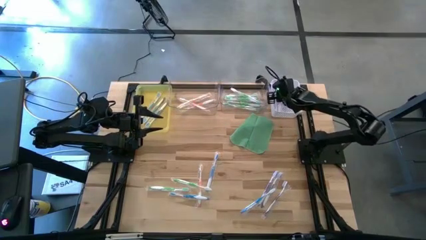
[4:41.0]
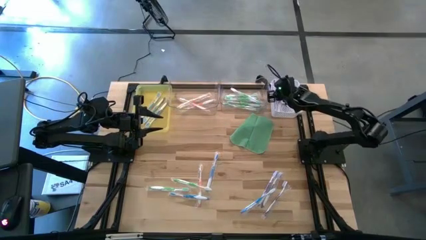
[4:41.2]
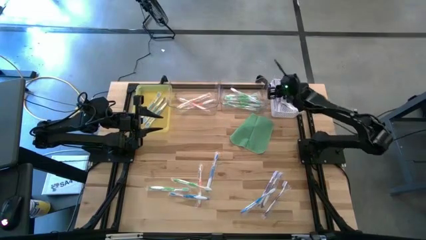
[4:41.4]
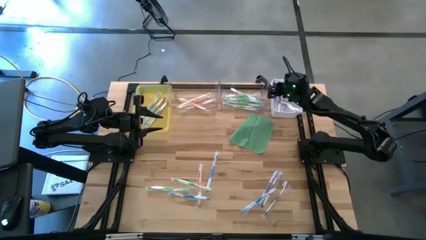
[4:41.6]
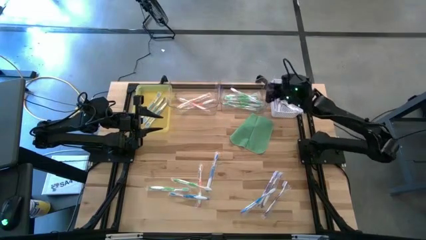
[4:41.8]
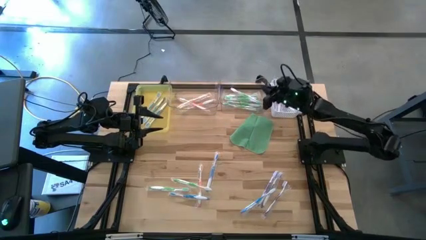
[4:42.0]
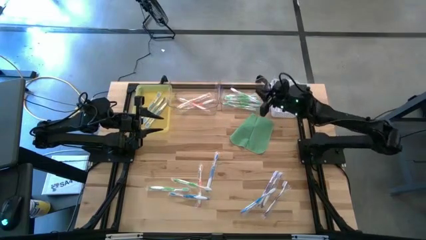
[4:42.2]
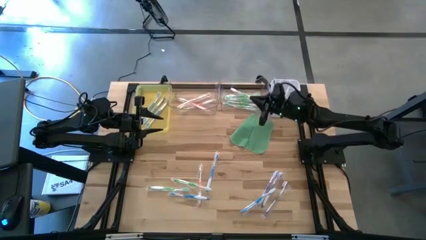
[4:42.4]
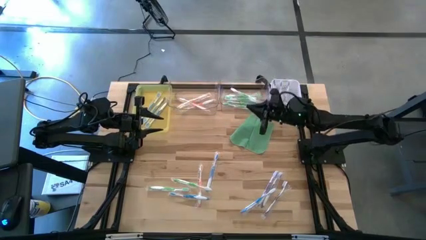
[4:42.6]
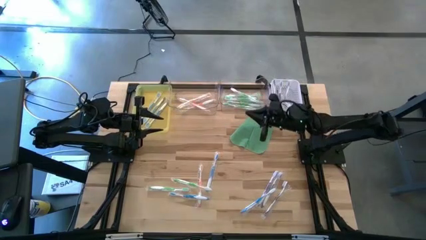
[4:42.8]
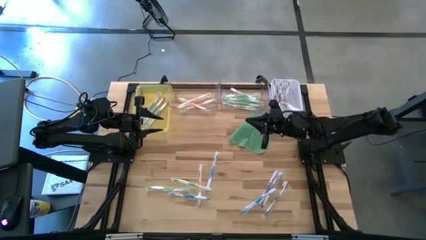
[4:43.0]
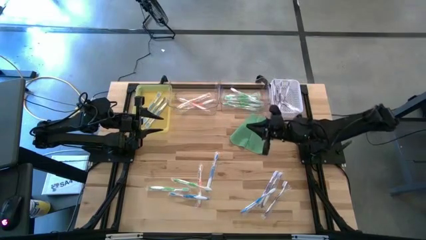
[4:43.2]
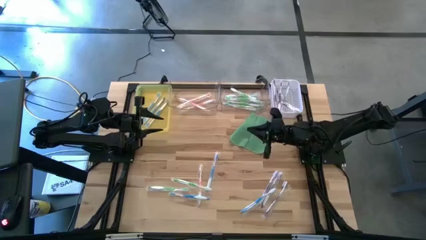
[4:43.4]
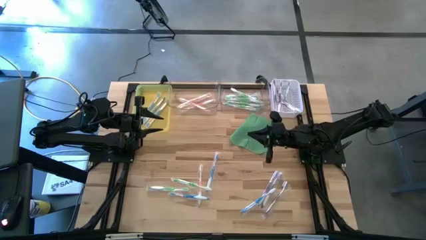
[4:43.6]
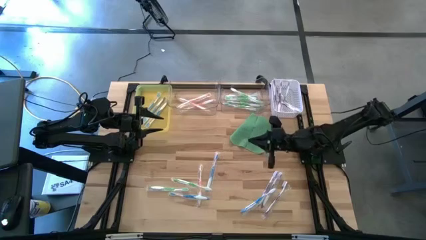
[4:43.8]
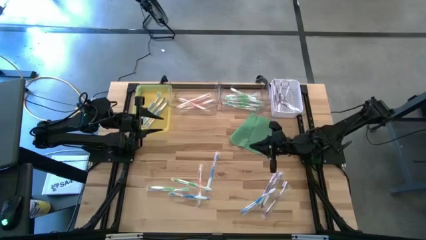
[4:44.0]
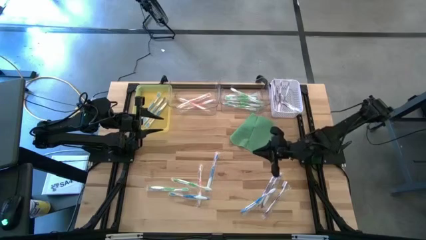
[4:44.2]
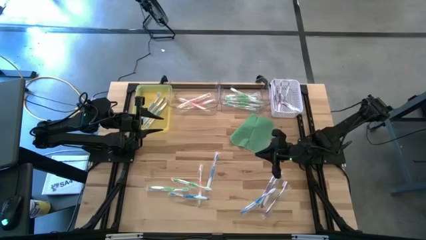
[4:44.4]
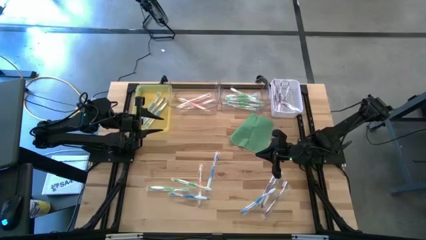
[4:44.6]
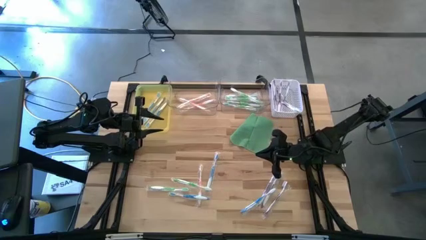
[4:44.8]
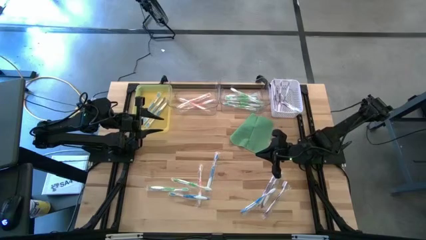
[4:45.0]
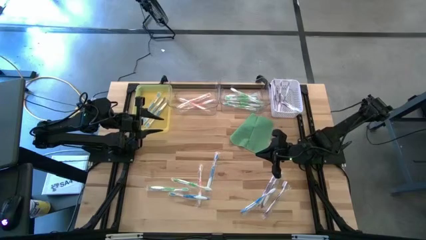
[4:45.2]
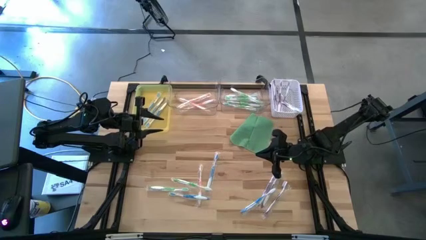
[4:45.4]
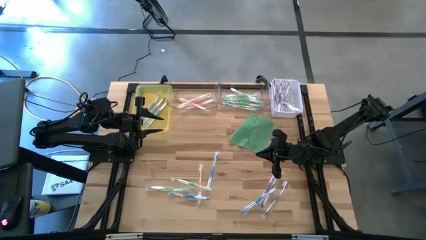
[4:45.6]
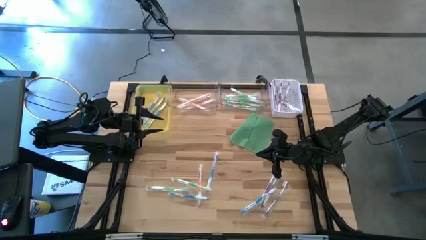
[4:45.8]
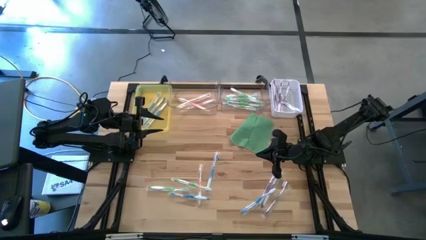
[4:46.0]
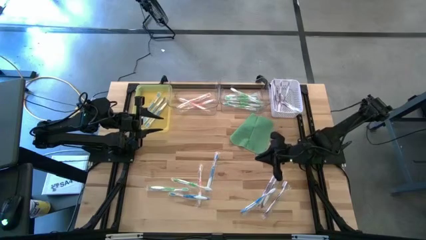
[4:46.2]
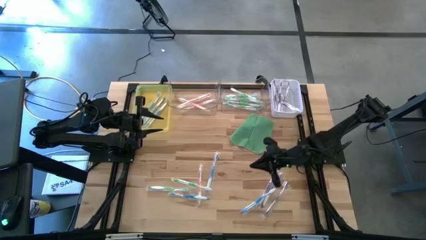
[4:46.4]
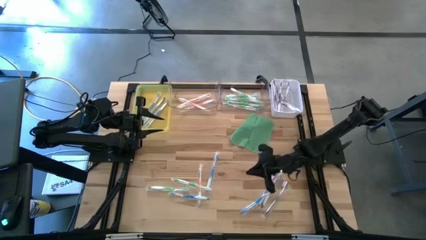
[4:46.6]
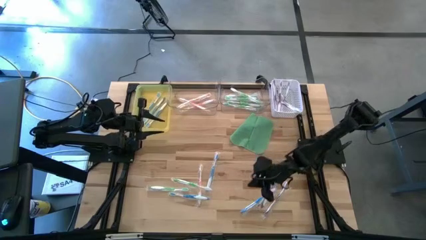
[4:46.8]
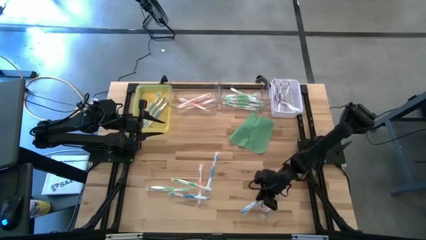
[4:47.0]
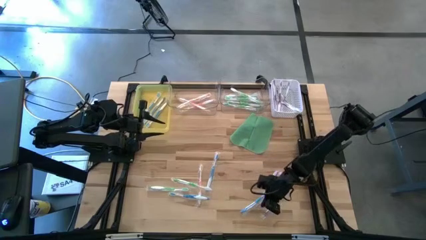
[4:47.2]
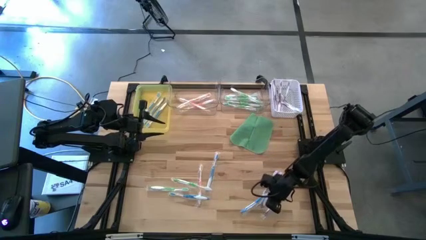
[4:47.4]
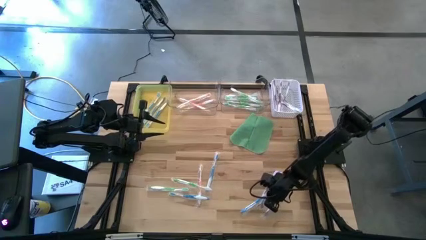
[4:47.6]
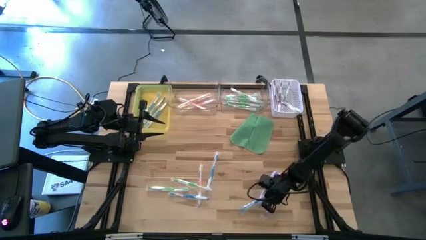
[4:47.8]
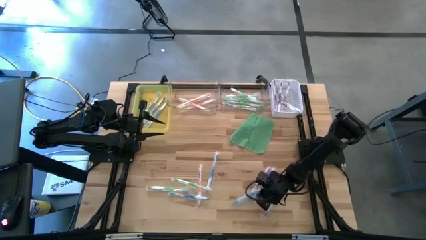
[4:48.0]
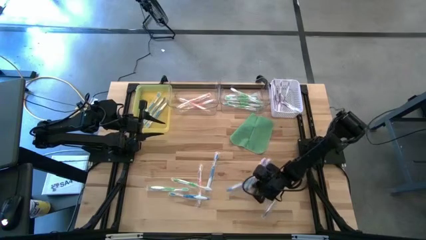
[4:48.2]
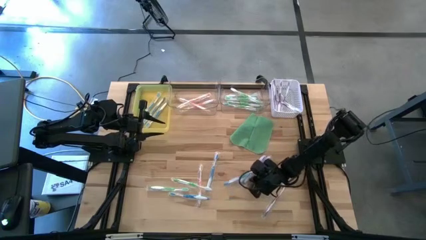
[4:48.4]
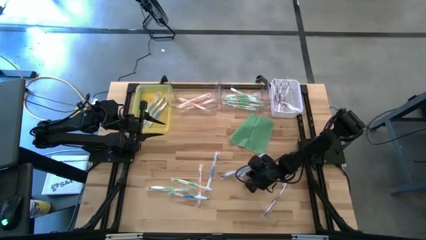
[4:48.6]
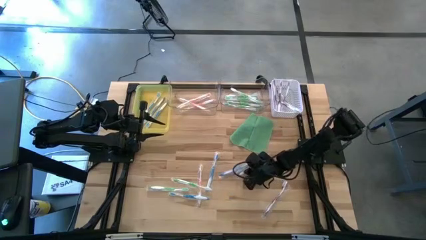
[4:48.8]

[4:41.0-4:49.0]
Task: Pick & Place Toothbrushes
Move the blue and purple toothbrush into the centre of the table

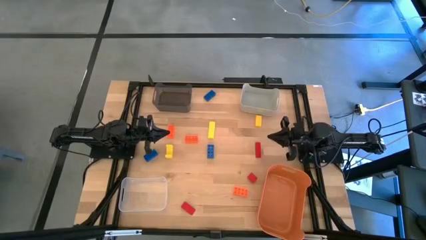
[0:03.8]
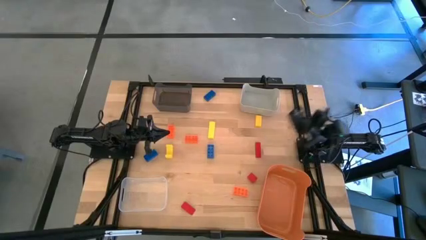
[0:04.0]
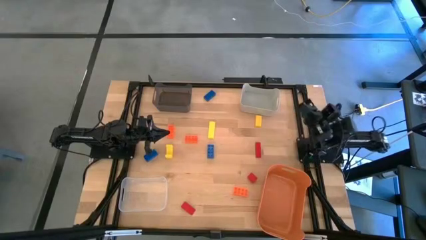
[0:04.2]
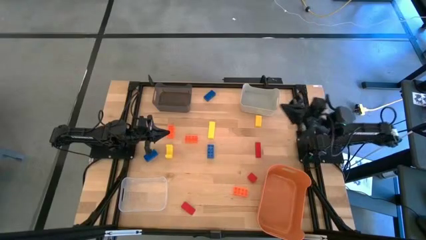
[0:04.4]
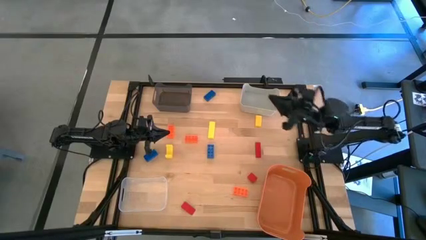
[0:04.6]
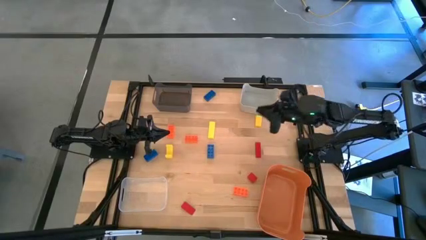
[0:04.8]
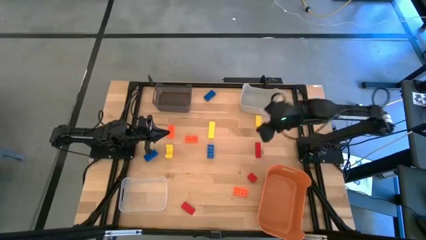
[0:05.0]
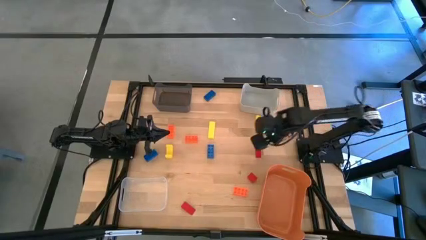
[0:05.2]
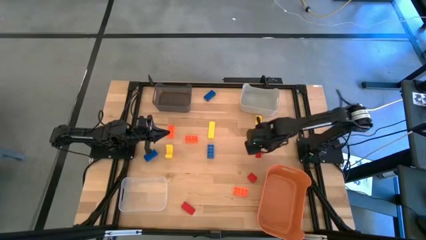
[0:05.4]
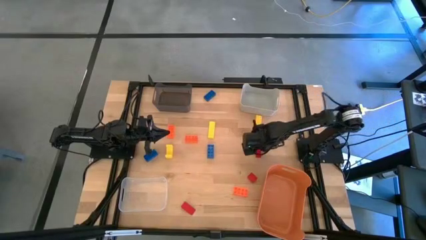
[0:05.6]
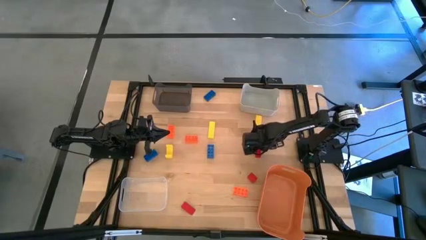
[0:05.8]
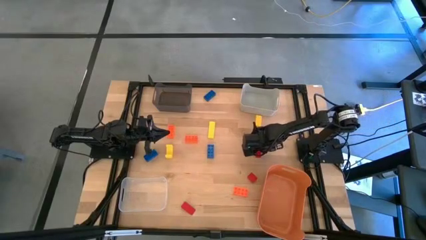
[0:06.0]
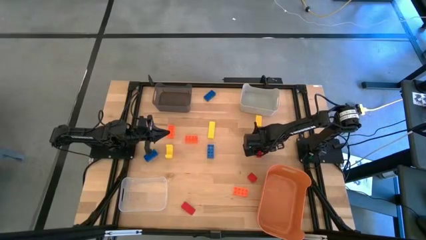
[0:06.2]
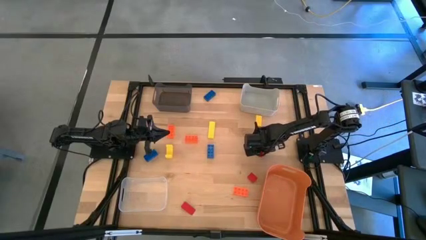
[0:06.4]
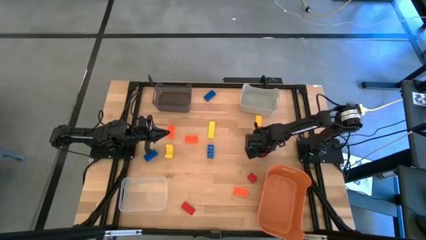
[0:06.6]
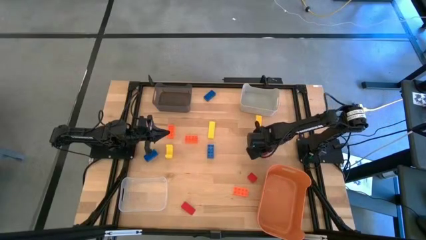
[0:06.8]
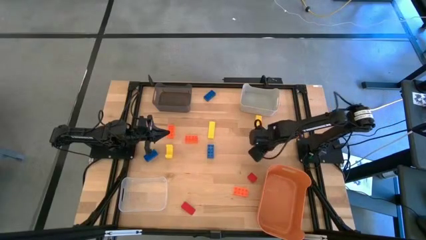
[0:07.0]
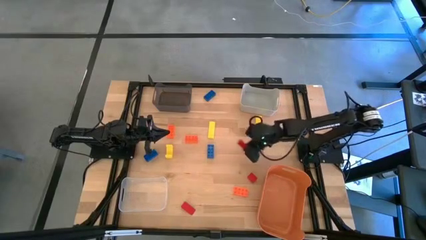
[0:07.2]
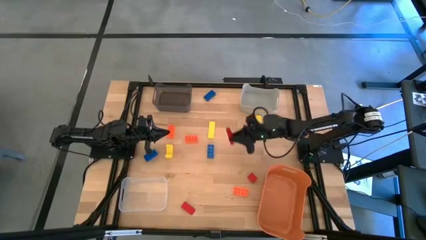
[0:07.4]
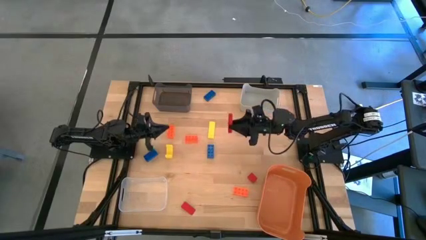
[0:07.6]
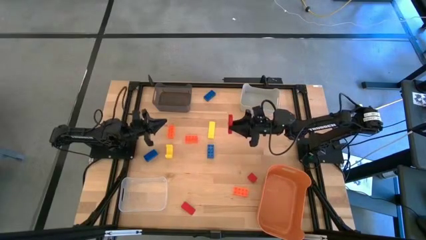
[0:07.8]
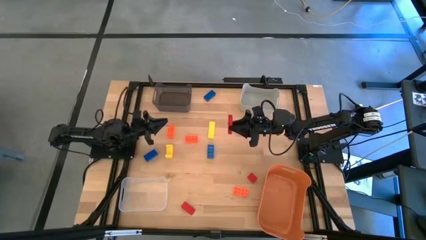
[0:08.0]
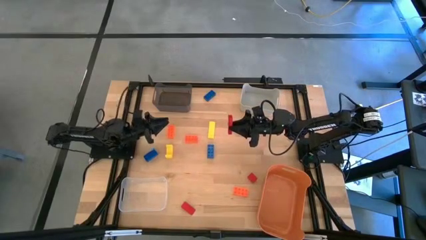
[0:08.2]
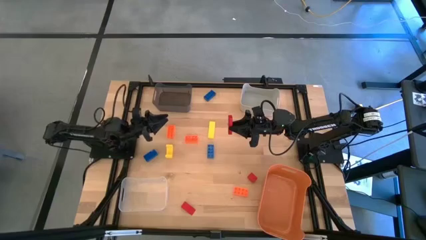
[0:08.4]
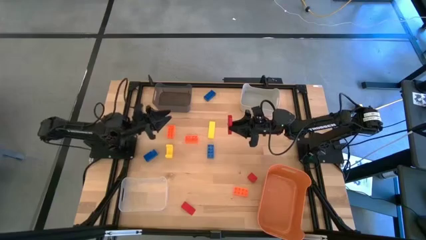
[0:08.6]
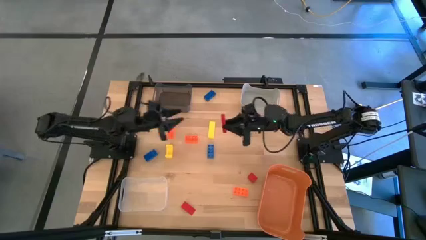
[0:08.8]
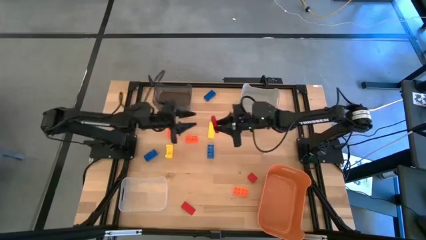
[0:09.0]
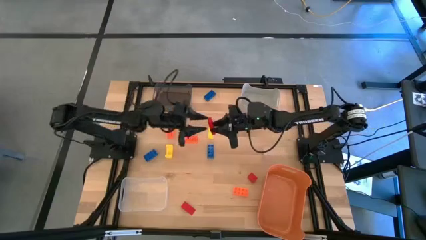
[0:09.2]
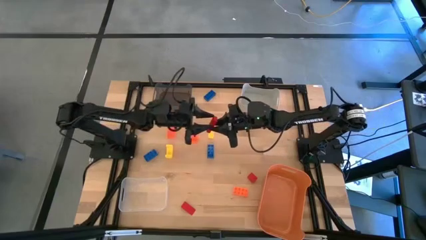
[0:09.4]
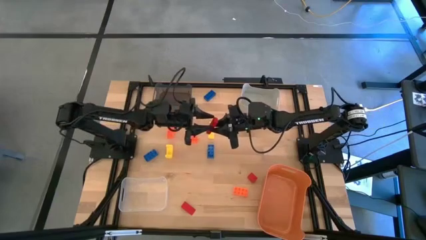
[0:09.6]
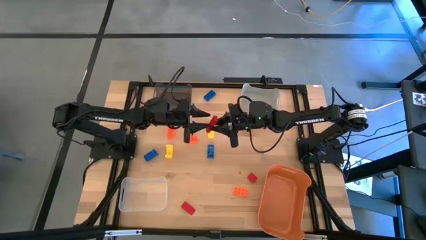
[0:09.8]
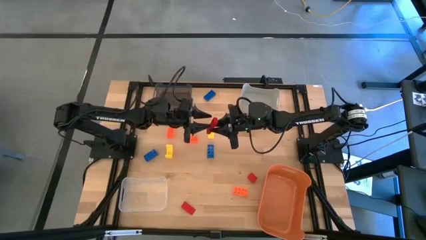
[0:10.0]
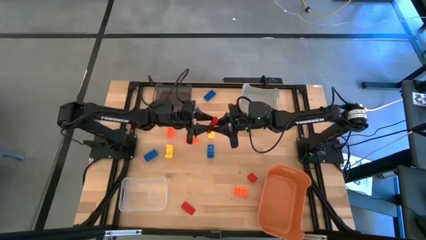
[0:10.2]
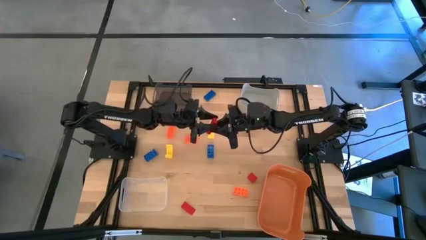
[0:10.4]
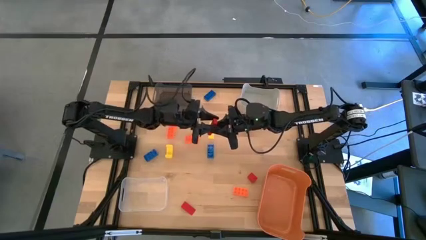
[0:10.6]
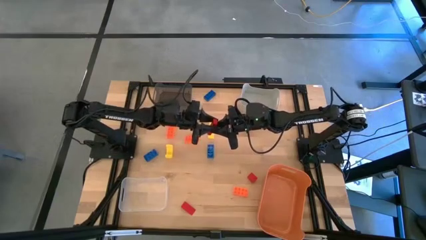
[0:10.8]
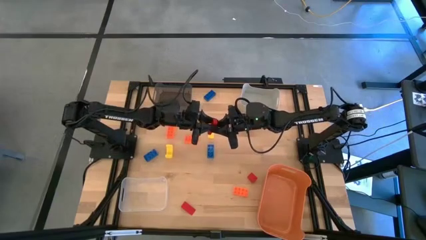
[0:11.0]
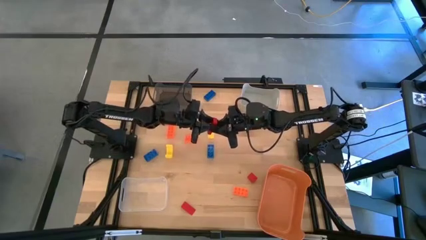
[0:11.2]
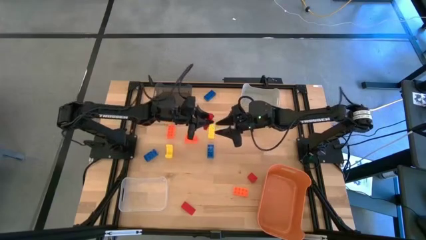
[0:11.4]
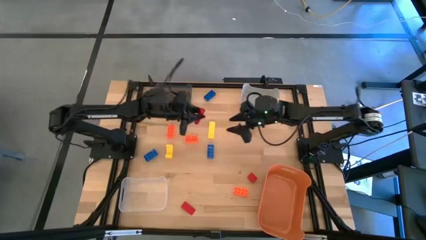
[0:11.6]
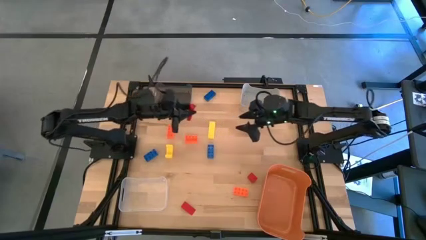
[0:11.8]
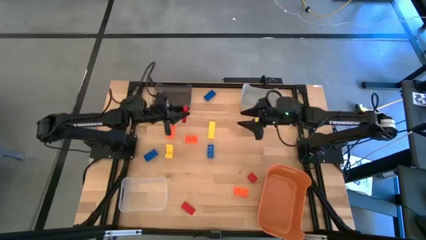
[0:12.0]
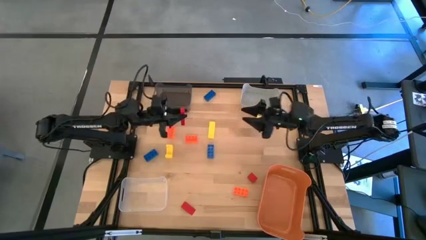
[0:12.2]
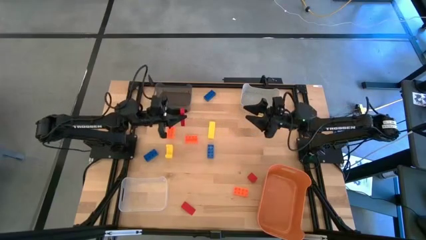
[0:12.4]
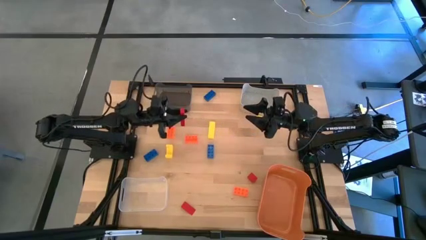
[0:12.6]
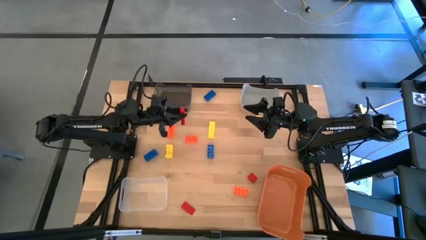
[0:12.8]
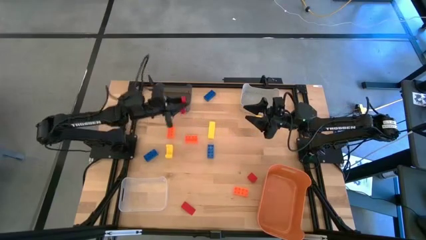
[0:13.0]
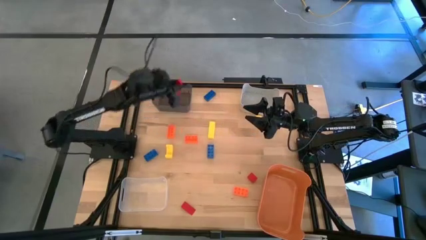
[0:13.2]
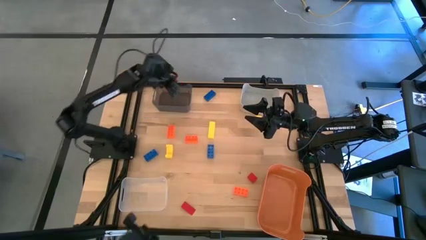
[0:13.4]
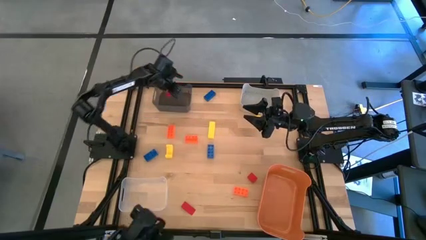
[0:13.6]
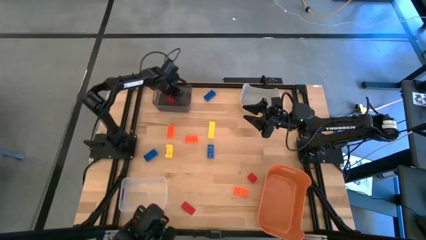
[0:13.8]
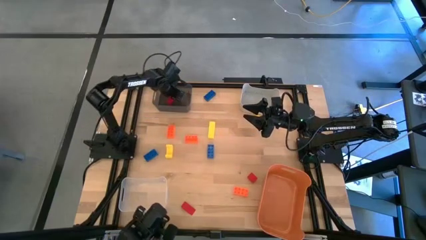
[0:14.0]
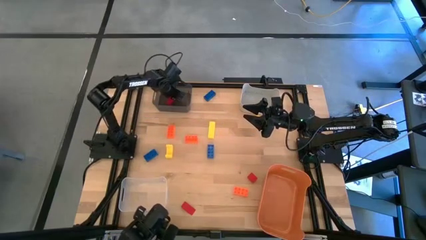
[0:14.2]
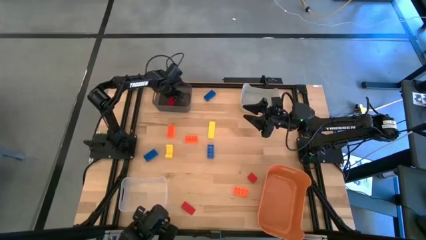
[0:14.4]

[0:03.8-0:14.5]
Task: Sort & place blocks by color
Put the top right red block into the black bin
